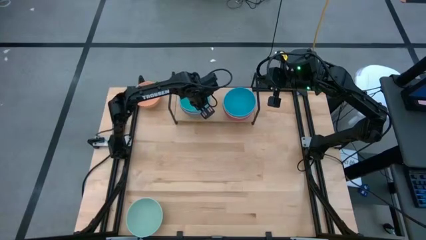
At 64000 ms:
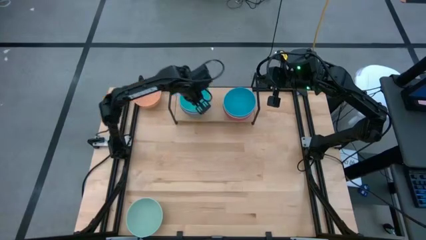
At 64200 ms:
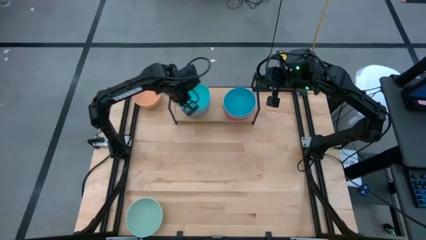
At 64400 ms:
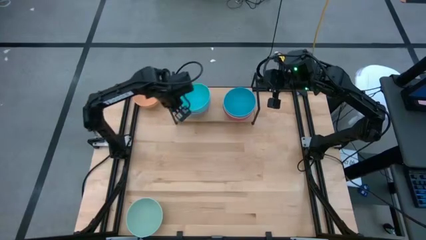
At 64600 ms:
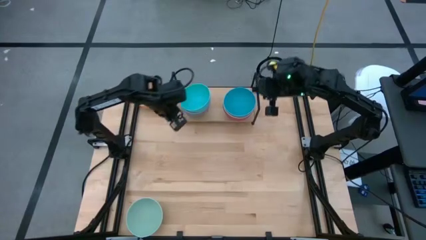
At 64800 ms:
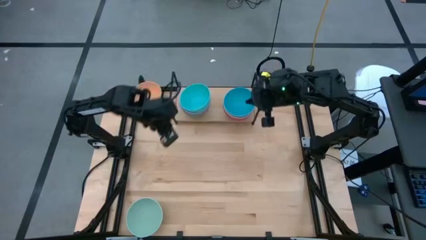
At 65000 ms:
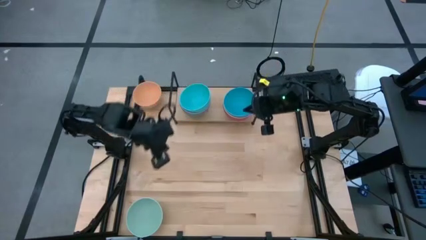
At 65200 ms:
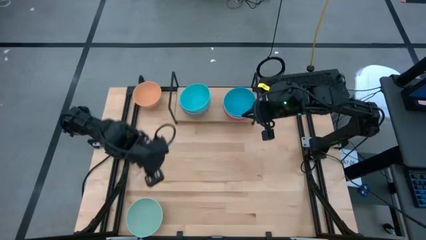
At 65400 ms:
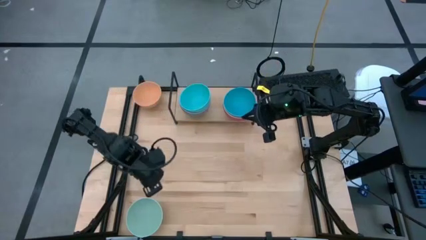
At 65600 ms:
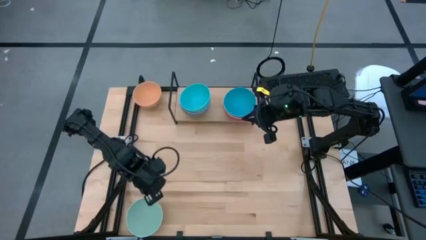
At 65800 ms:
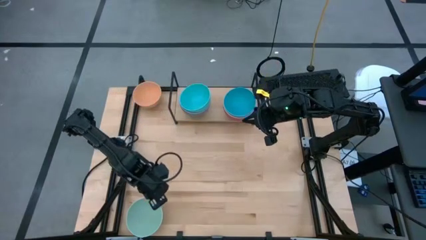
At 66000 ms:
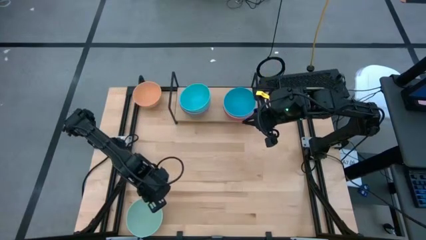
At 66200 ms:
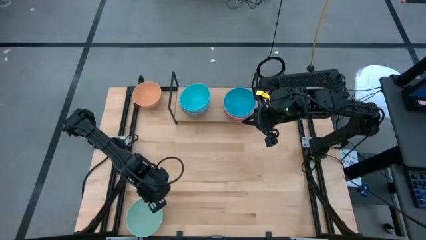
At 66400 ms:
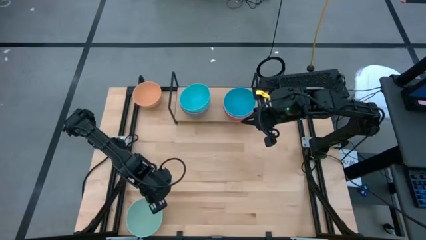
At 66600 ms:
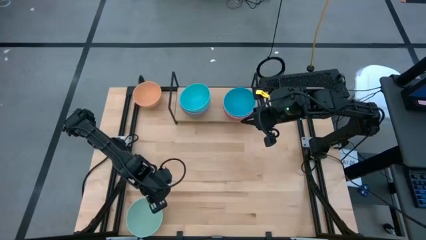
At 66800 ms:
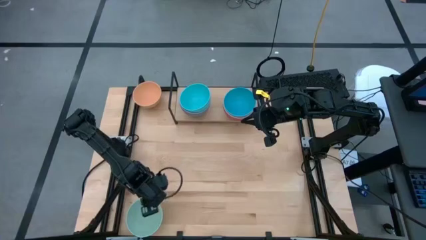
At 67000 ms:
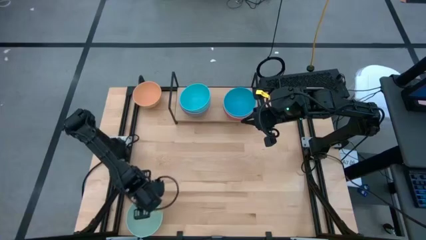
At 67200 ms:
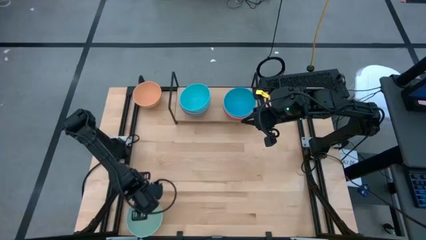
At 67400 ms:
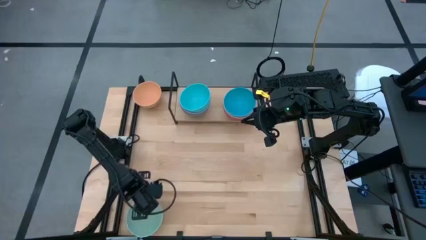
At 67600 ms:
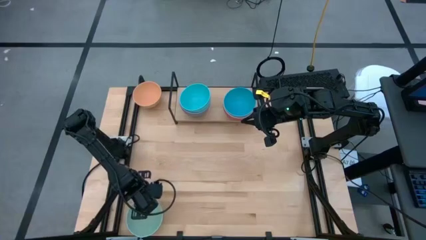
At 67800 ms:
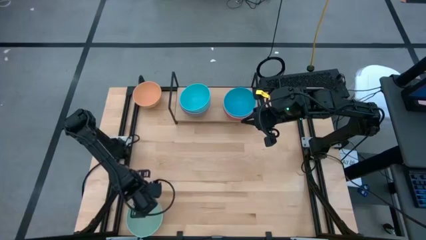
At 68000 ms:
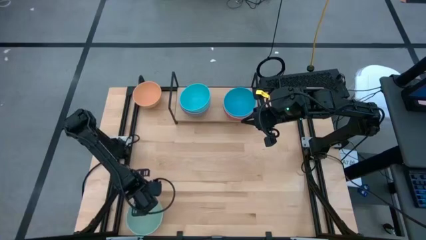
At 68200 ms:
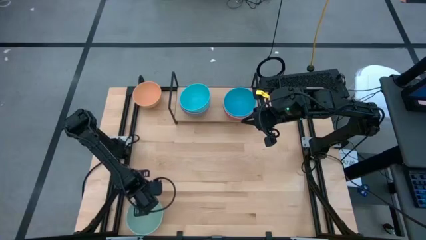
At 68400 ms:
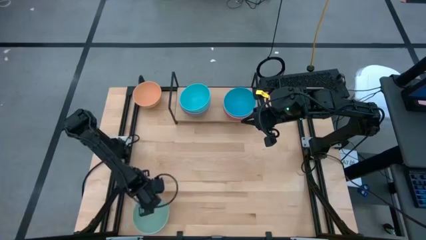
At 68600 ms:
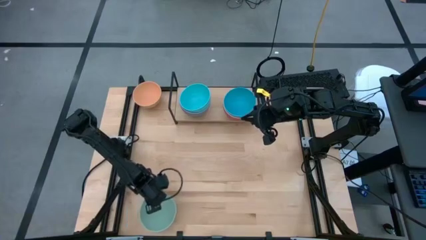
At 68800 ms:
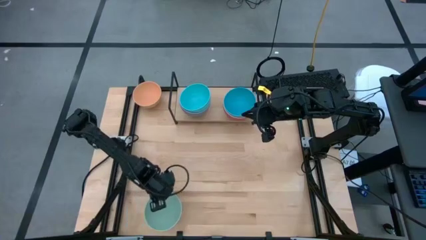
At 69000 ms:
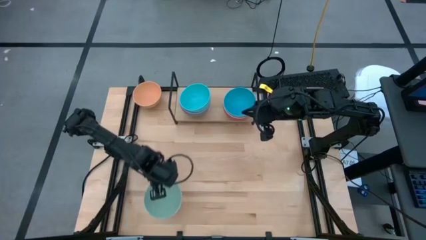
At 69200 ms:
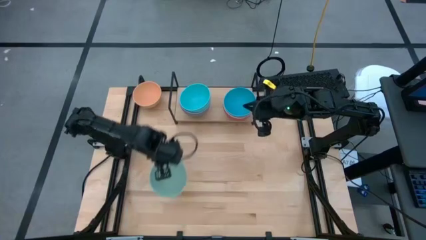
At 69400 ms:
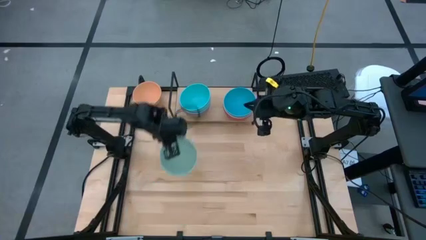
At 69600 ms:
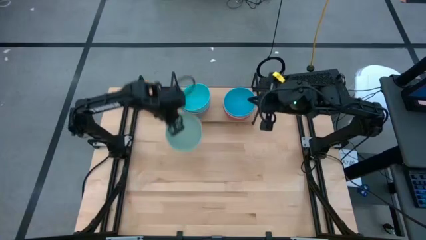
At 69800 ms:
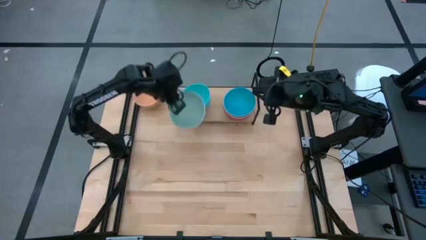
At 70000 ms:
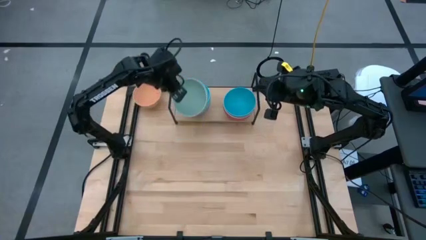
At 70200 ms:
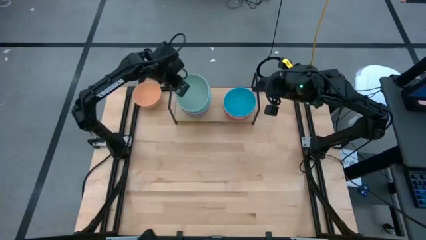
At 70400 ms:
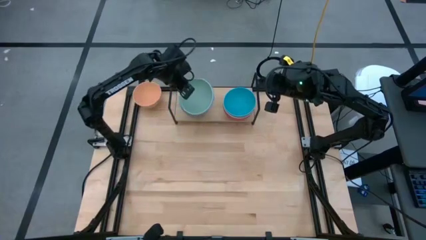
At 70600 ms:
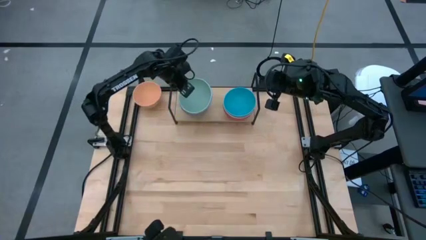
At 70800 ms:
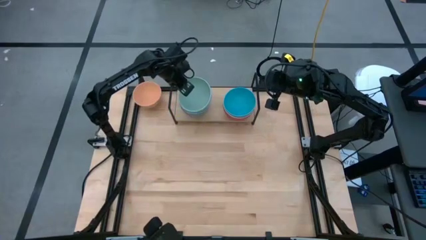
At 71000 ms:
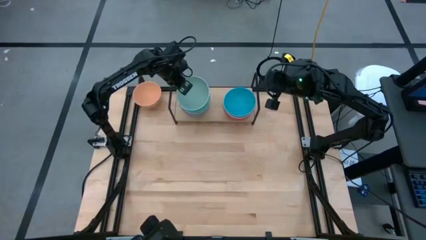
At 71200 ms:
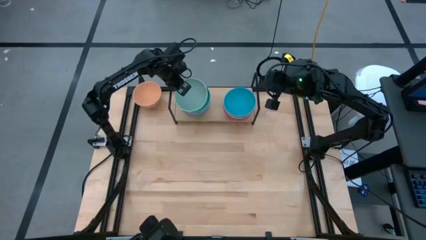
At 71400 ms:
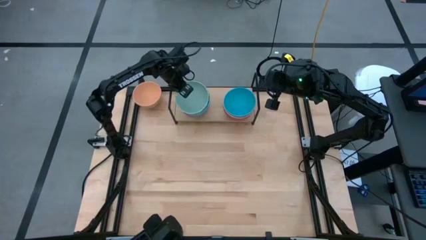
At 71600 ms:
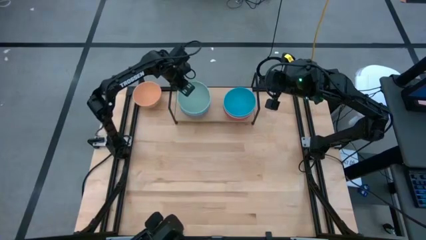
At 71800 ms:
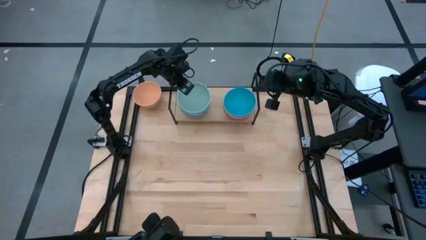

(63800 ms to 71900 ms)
Task: Place and stack bowls onto a shelf
Stack the green bowl on top of the light blue bowl on the shelf

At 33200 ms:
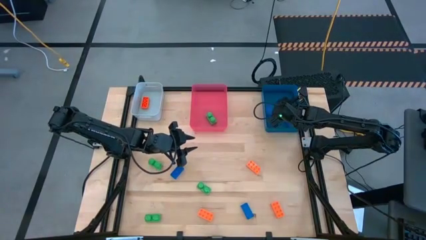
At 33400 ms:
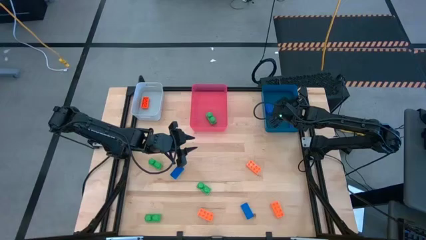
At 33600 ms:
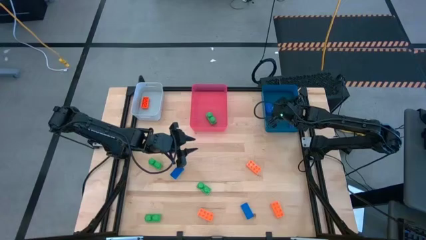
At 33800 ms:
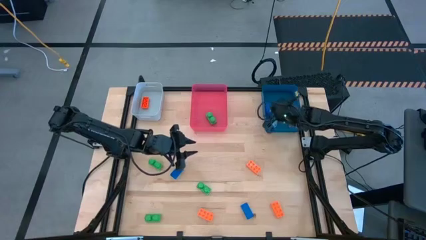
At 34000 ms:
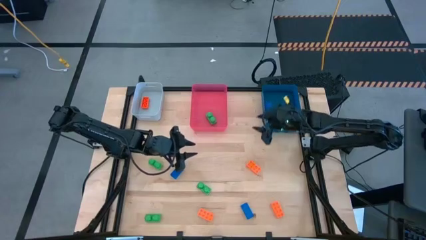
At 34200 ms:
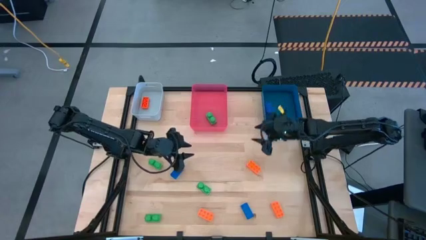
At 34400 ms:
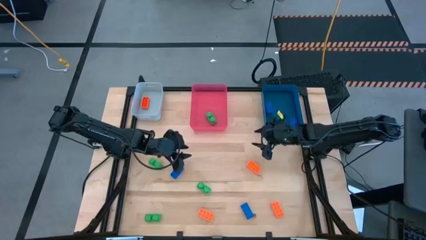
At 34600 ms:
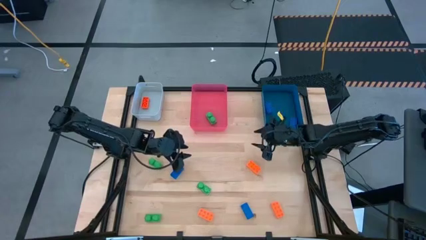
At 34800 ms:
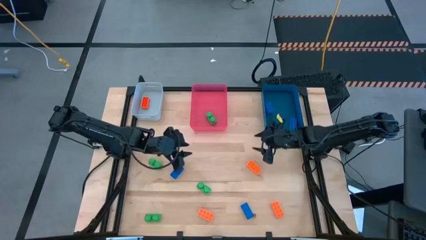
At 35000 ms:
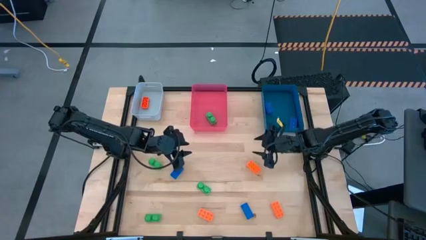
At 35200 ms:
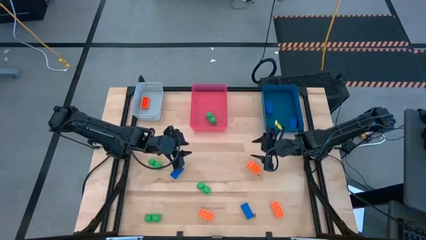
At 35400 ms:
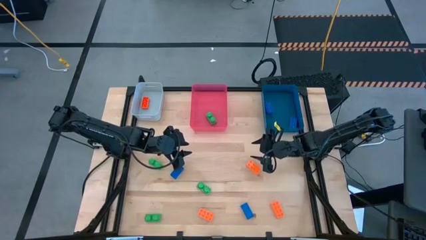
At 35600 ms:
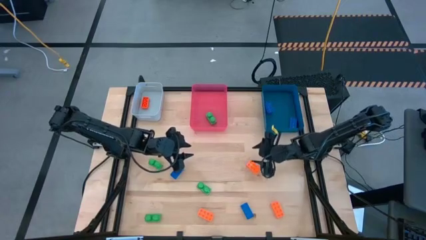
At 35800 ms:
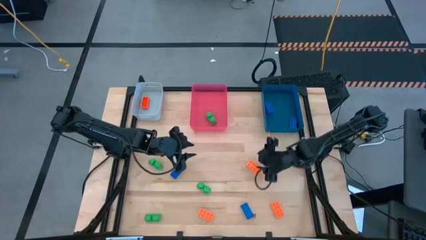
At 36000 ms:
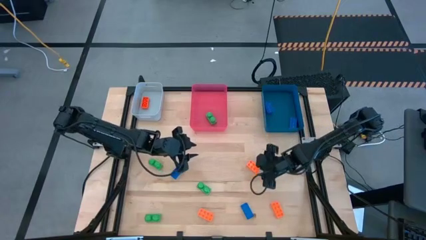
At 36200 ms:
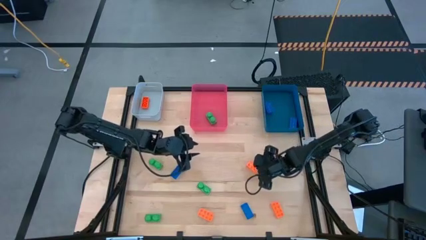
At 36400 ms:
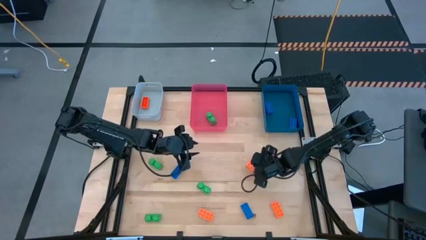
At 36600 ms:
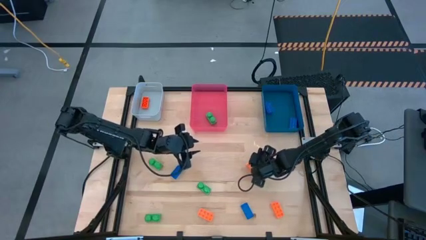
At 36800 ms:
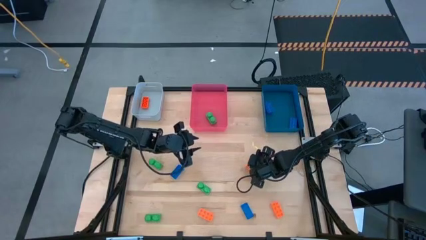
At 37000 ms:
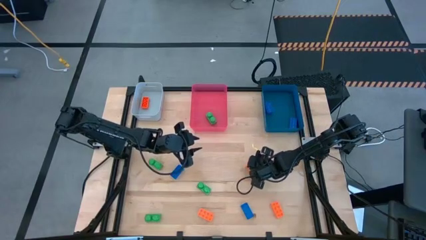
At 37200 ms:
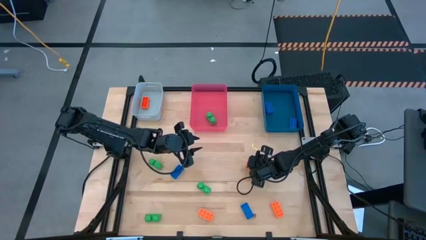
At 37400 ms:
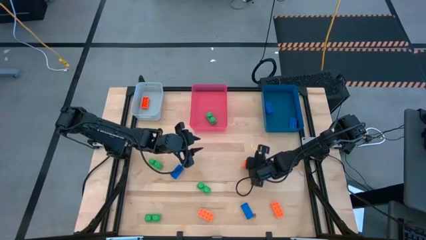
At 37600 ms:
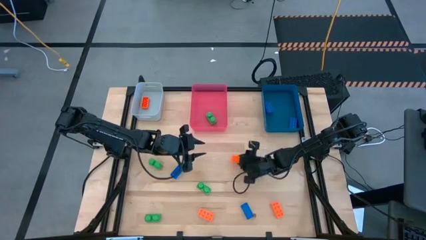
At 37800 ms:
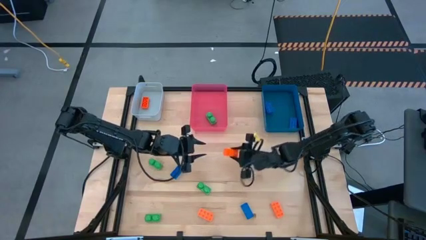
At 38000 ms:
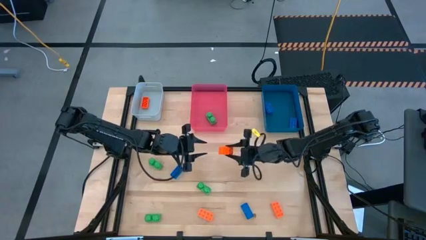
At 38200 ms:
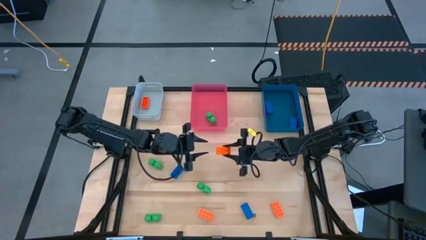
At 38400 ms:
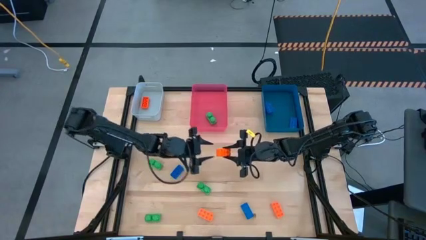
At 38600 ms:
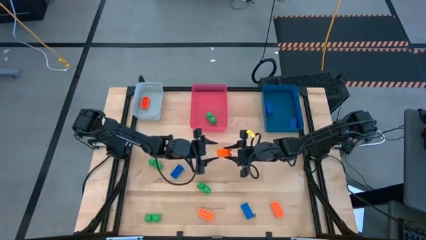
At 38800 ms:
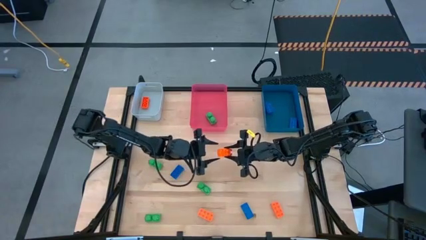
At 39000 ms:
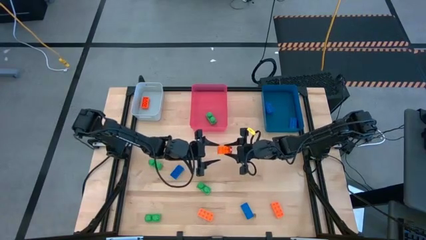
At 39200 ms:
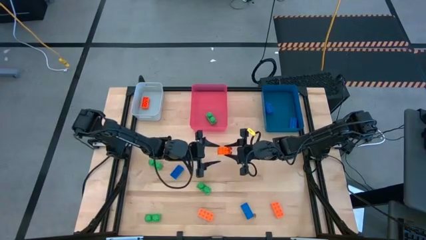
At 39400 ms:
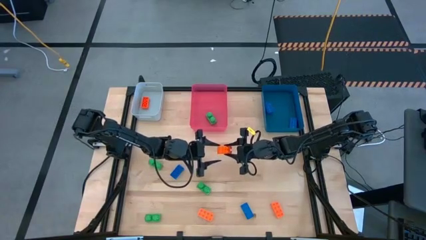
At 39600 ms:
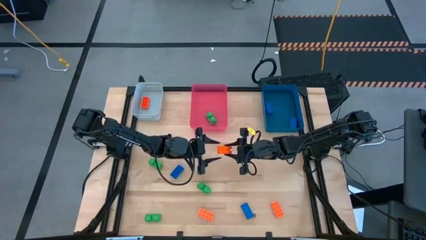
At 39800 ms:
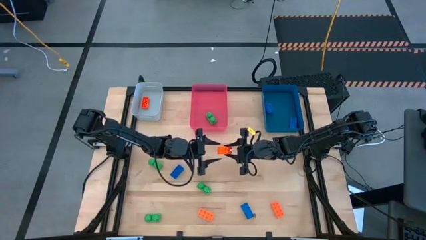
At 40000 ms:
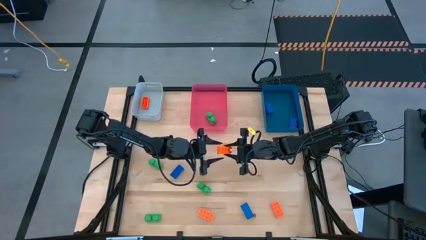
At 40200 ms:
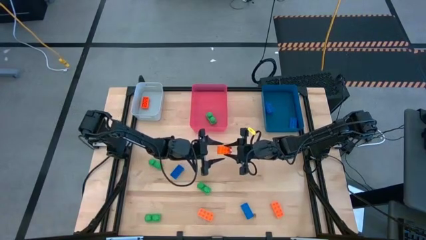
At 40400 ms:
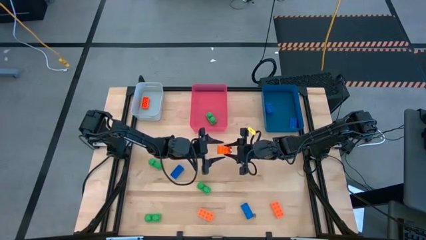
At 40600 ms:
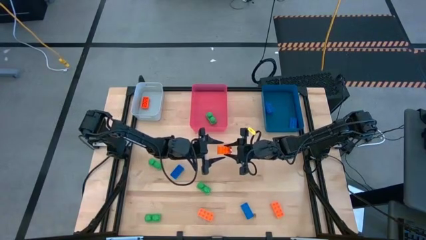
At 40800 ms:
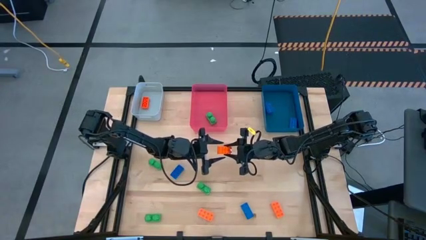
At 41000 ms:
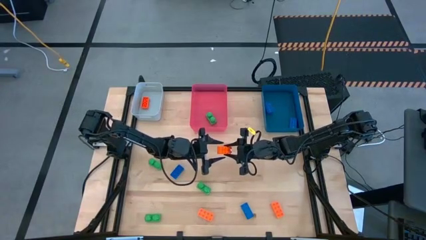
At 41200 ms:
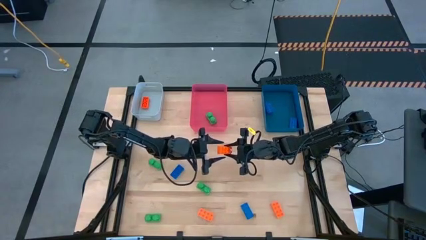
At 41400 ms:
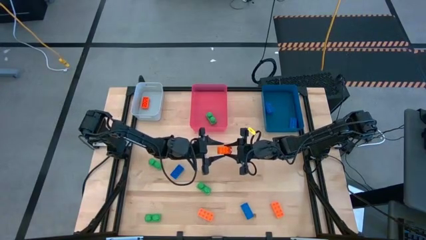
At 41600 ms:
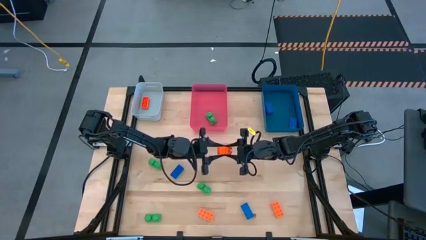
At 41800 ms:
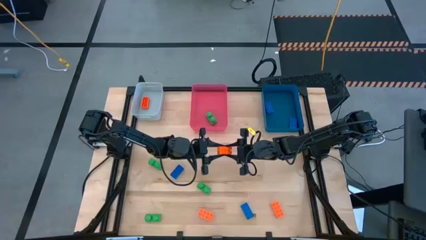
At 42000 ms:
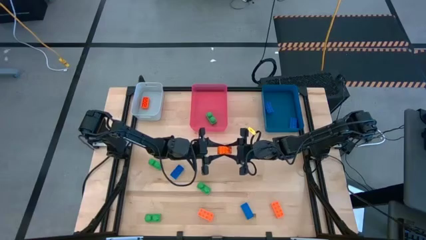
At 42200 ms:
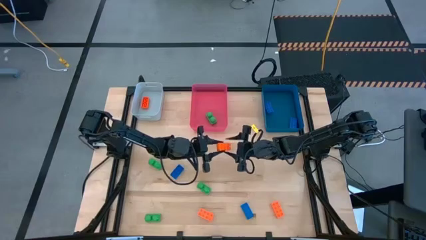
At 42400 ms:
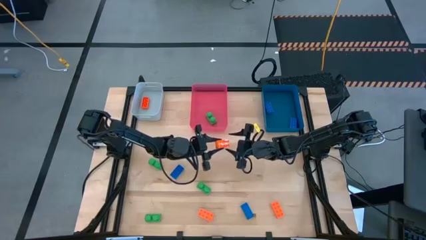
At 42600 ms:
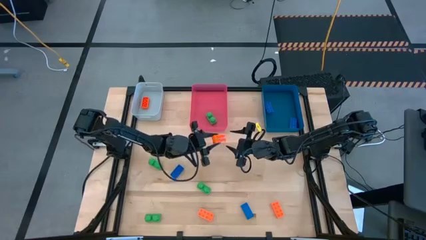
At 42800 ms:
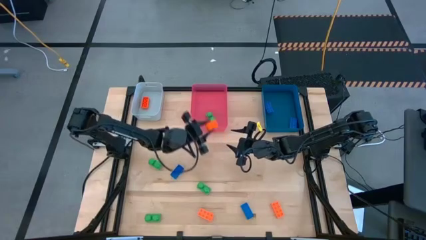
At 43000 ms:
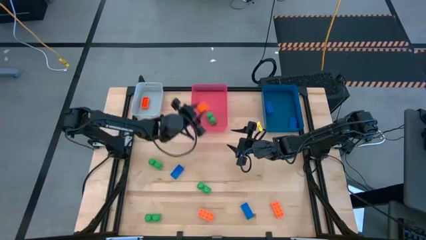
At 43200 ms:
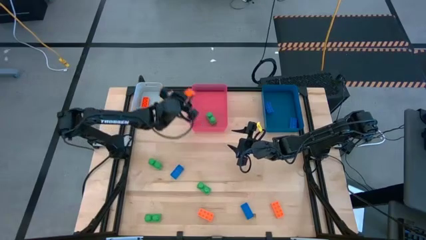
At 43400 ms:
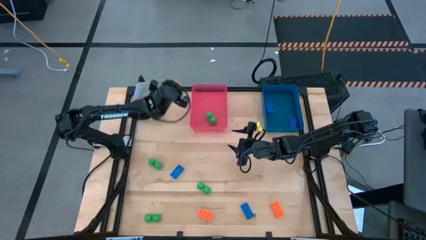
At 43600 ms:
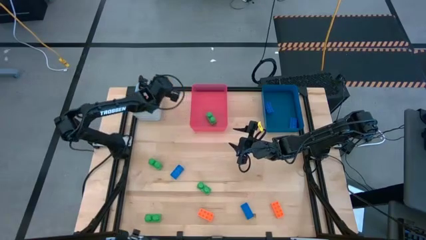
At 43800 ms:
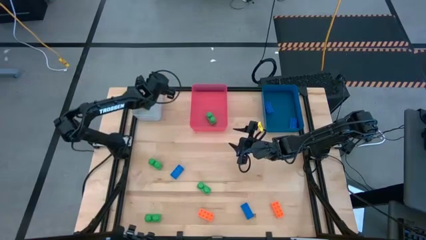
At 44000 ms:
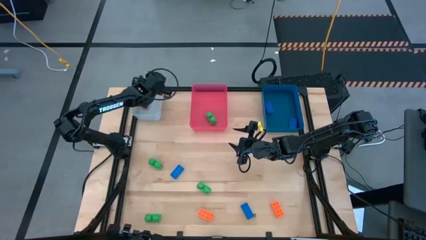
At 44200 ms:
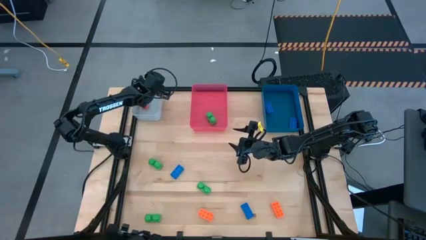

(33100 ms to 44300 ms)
Task: Sort & place blocks by color
Put the orange game piece into the white bin
